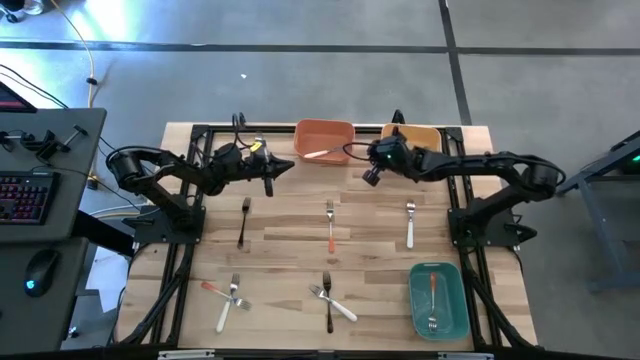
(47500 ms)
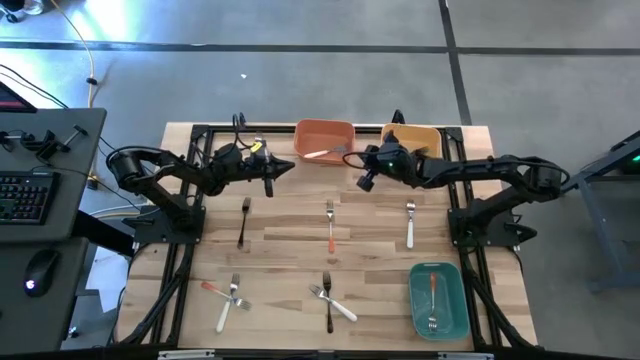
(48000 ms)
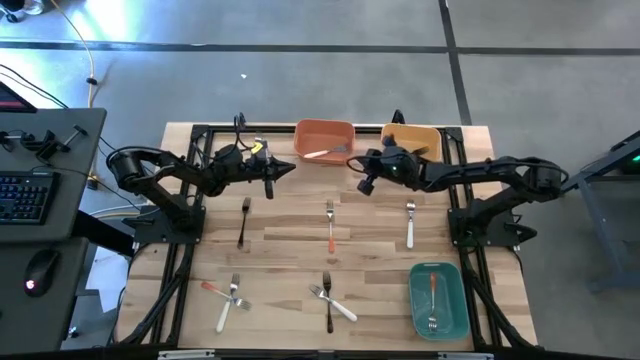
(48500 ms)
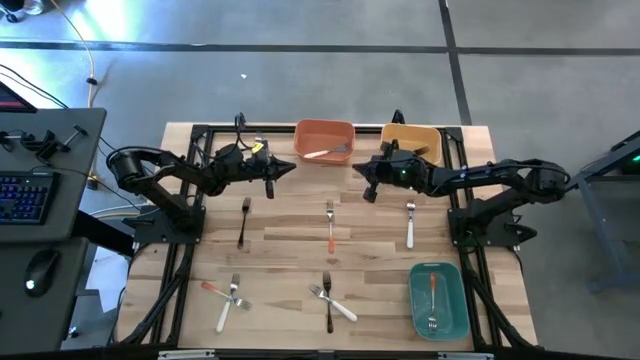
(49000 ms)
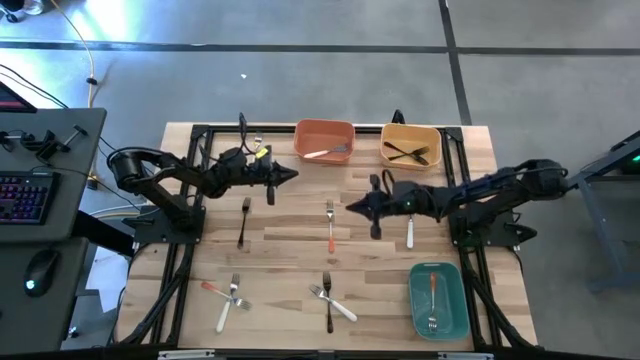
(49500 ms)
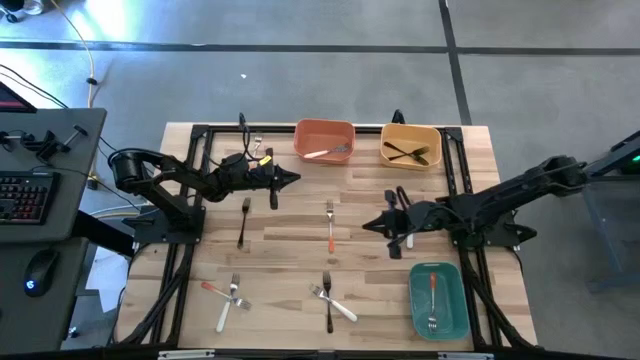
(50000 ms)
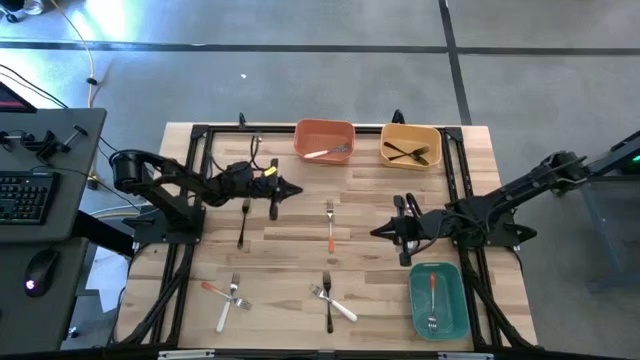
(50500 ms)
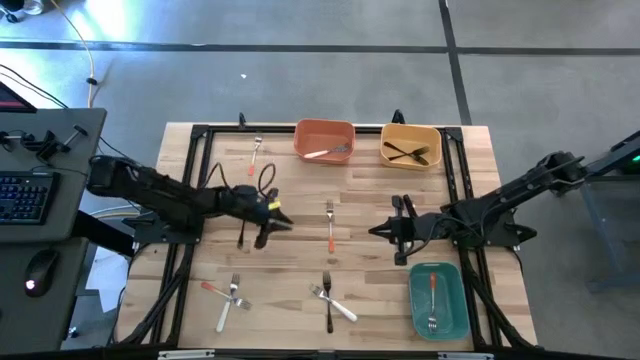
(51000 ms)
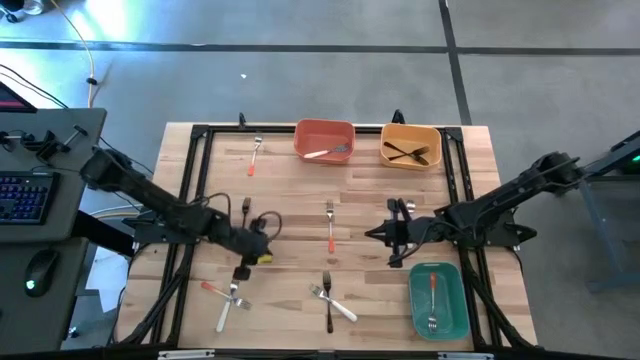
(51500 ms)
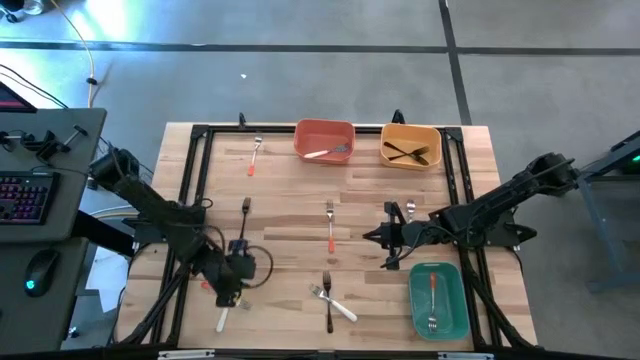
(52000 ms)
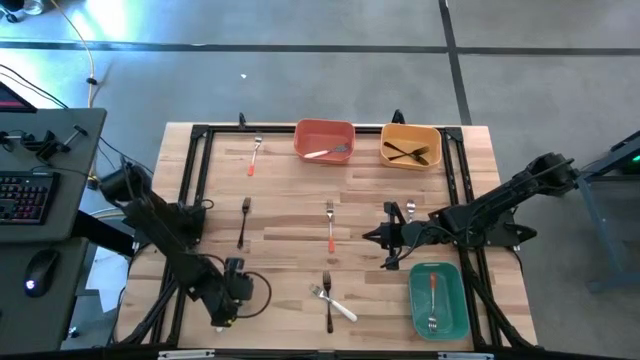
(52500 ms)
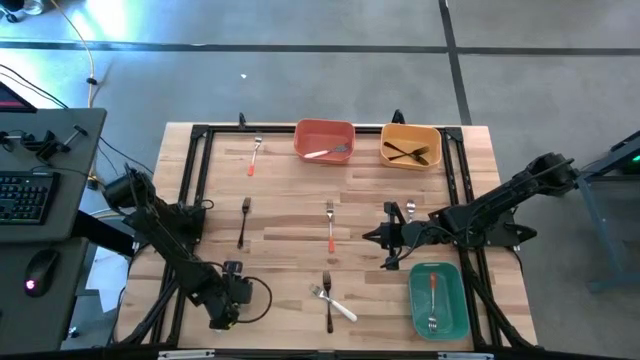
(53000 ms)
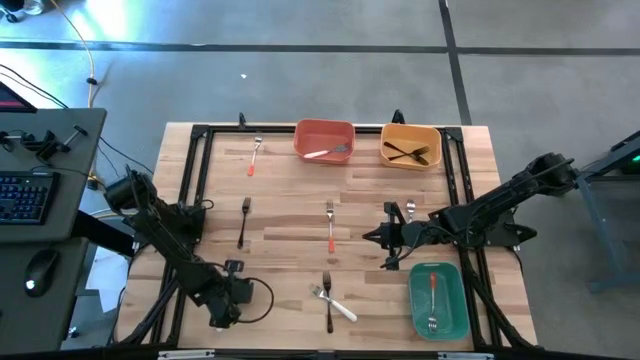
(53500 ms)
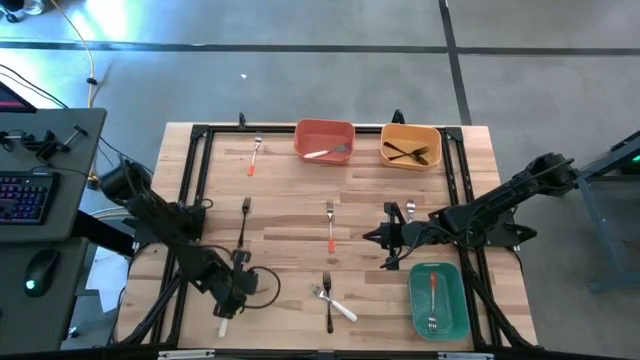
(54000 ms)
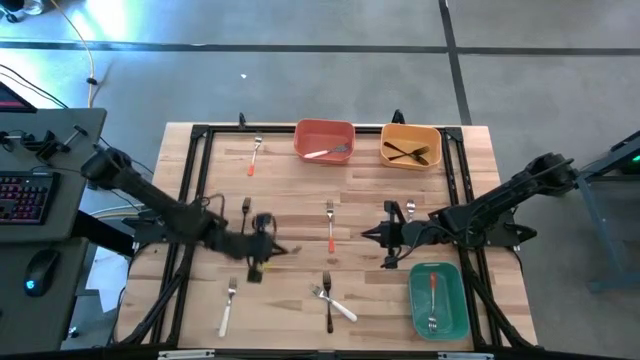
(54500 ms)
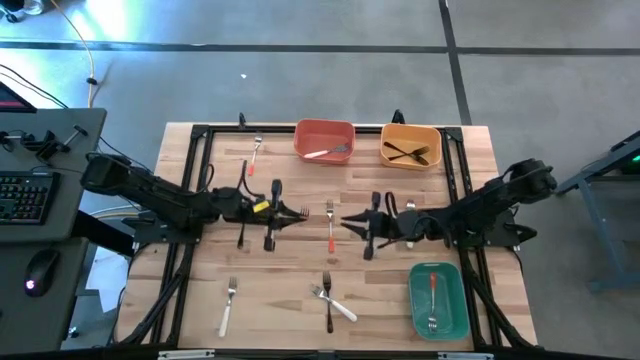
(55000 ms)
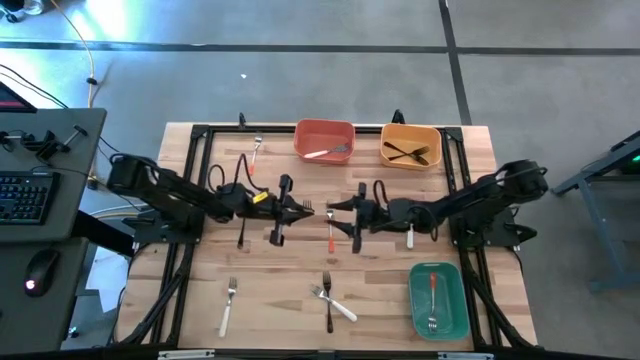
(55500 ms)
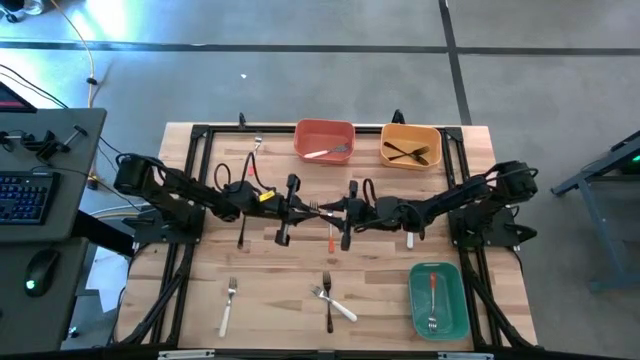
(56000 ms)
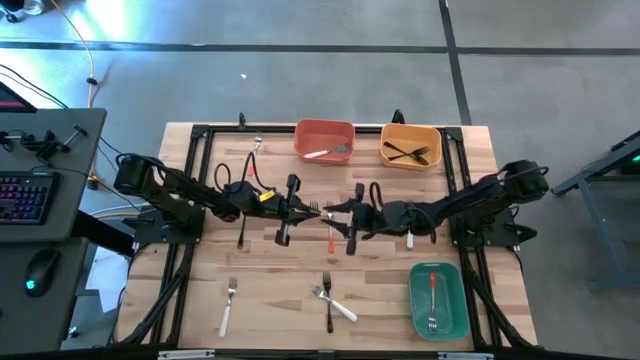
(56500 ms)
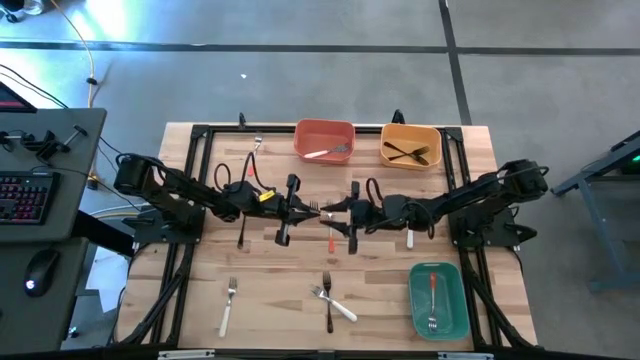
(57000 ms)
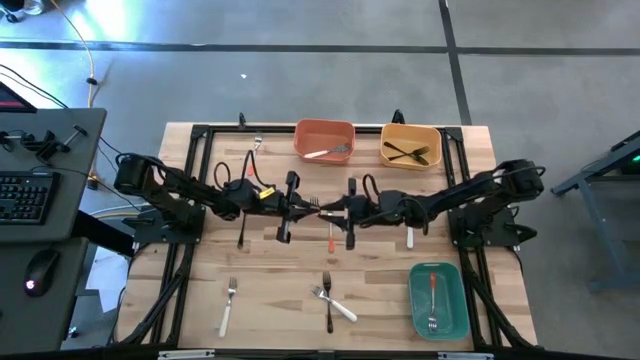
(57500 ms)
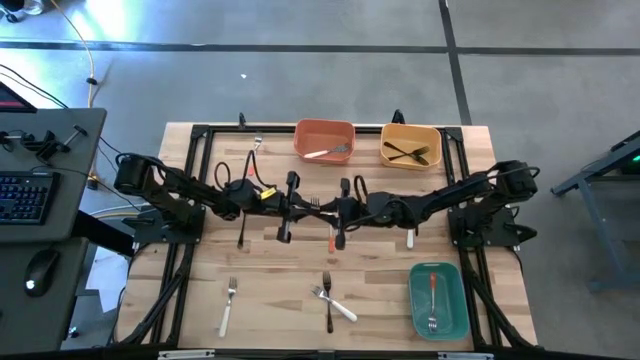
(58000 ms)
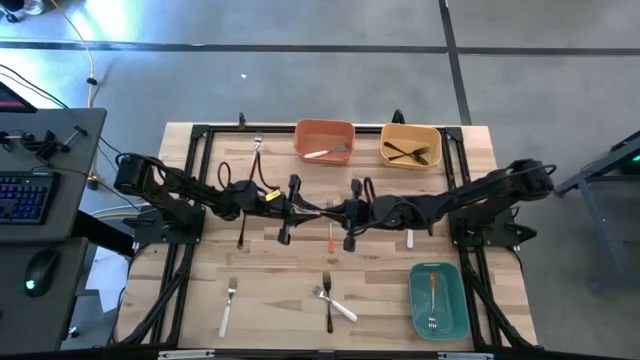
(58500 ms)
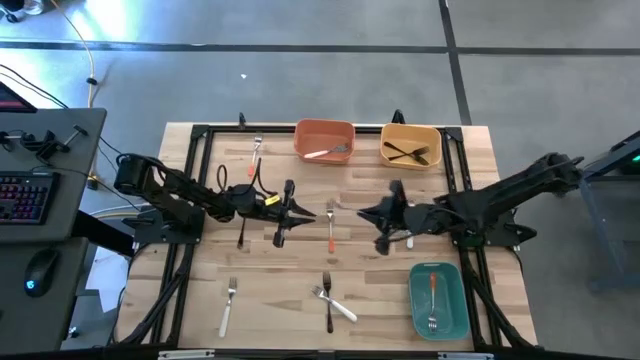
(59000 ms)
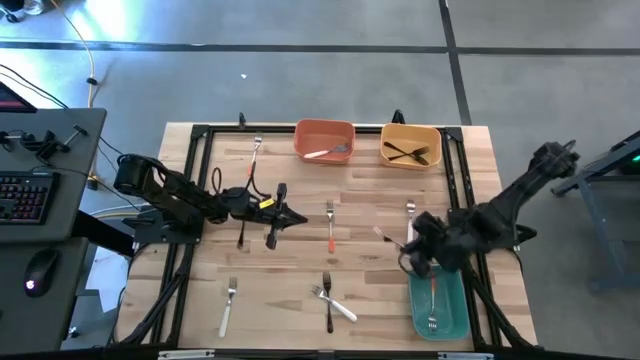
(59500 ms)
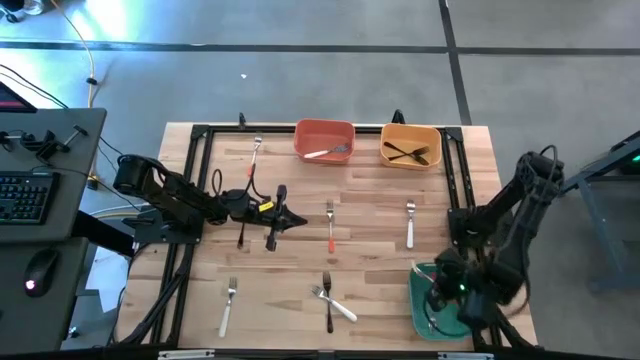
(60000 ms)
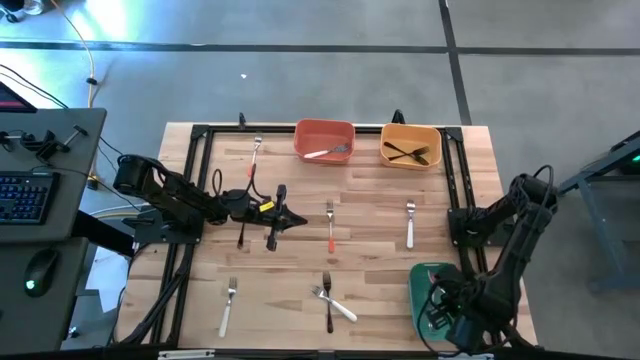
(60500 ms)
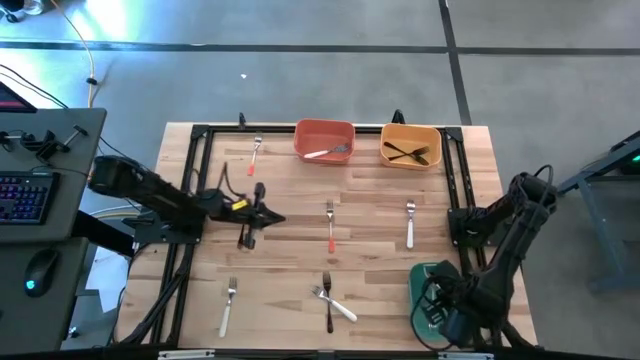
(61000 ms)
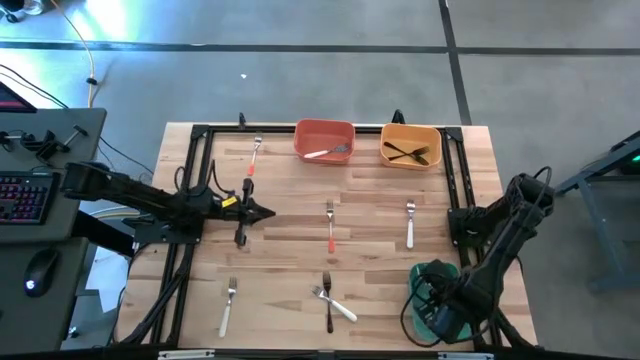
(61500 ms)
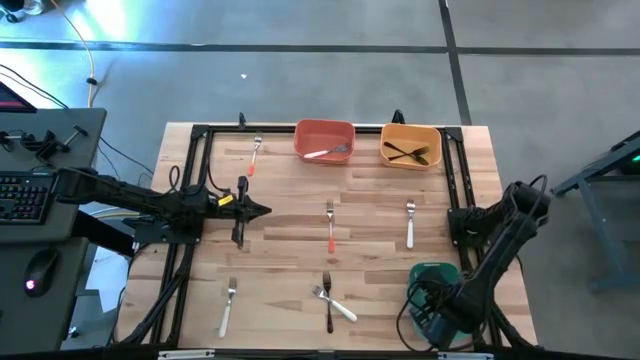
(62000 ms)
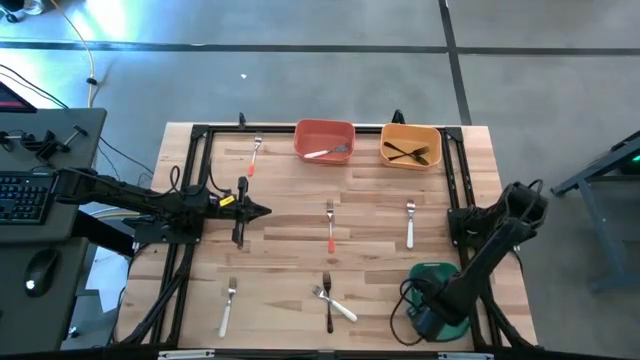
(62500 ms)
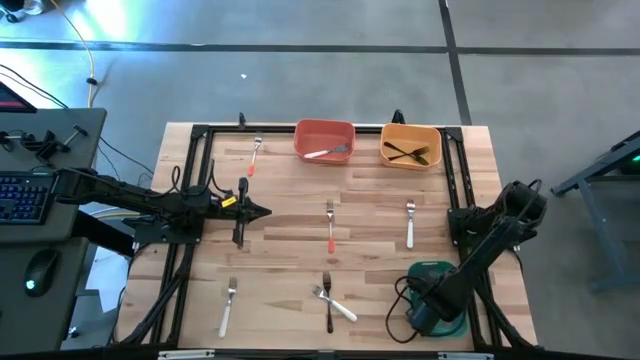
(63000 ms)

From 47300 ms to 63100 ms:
Task: Sort silverware by color (type)
Put the orange fork into the green bin

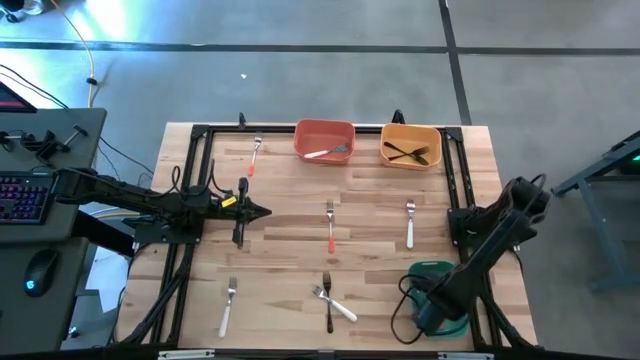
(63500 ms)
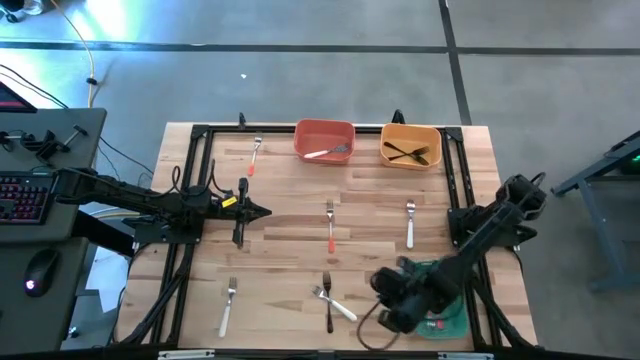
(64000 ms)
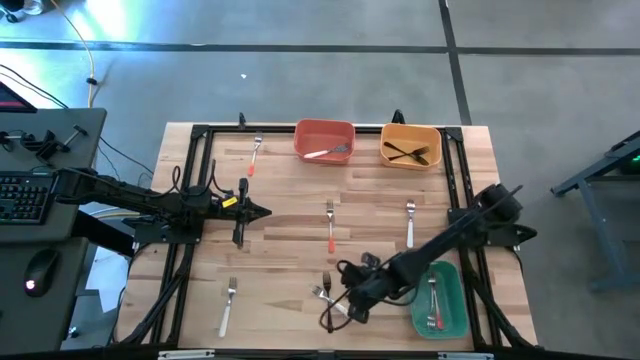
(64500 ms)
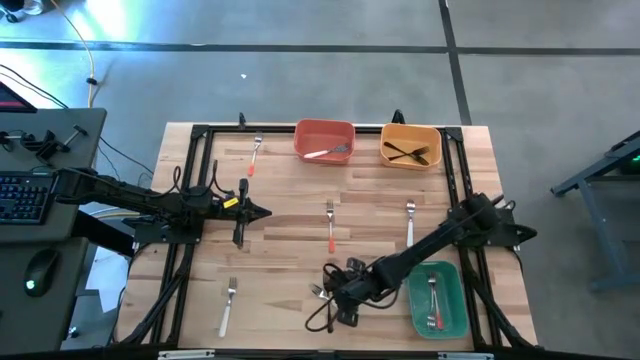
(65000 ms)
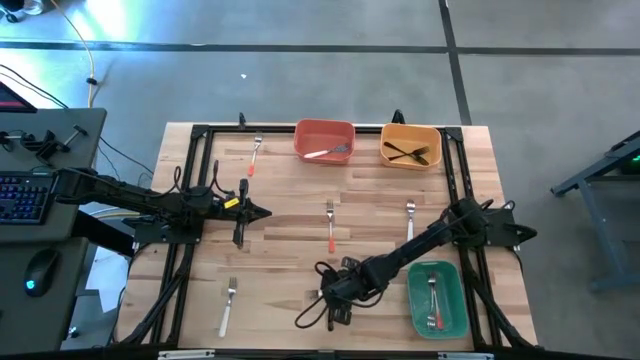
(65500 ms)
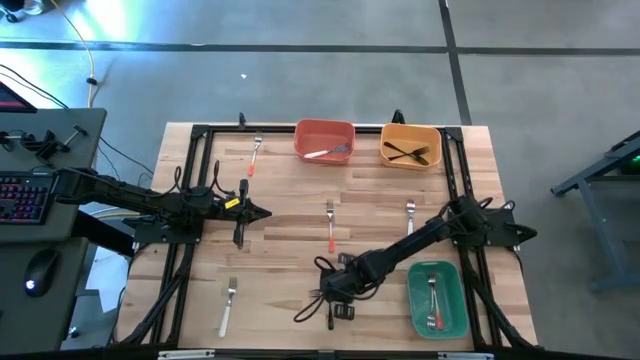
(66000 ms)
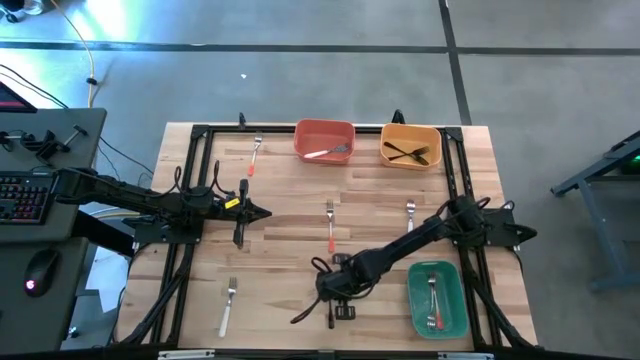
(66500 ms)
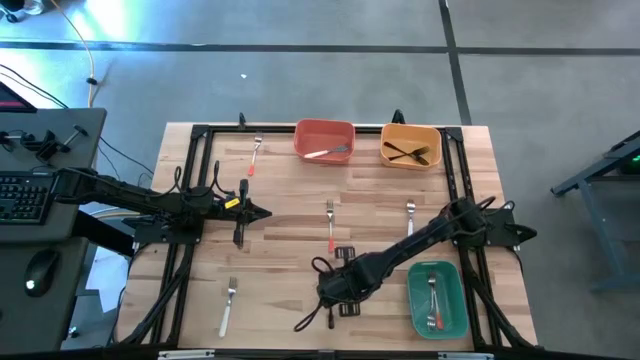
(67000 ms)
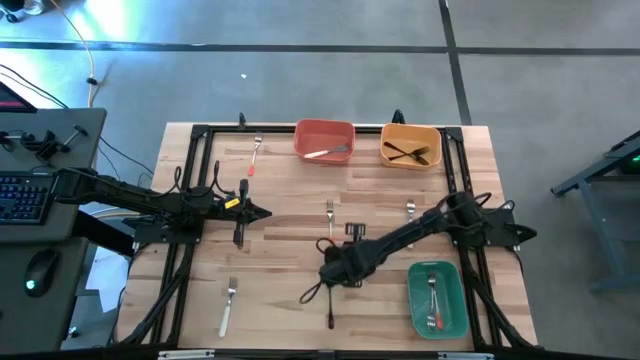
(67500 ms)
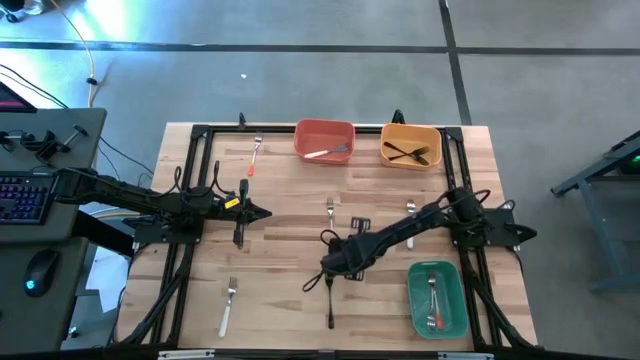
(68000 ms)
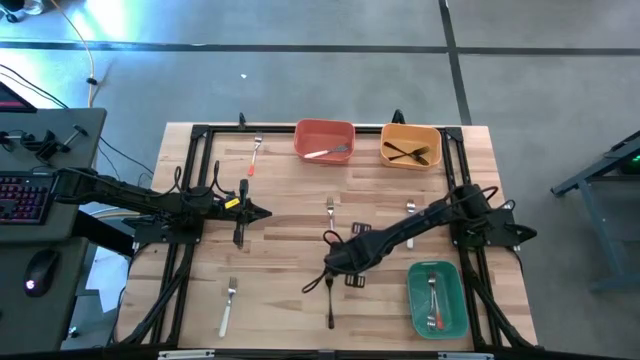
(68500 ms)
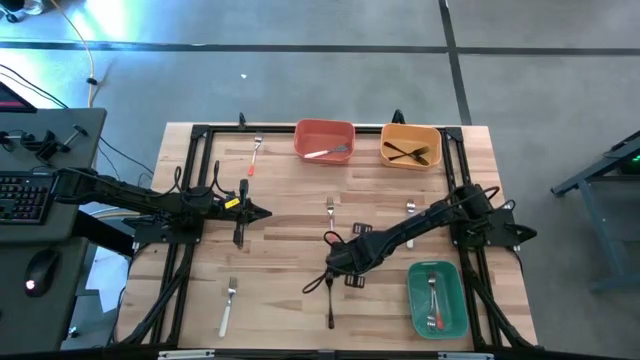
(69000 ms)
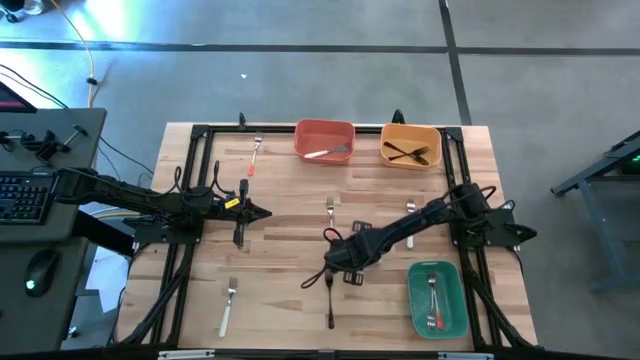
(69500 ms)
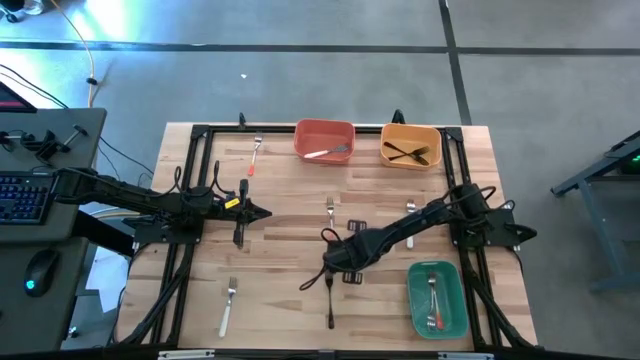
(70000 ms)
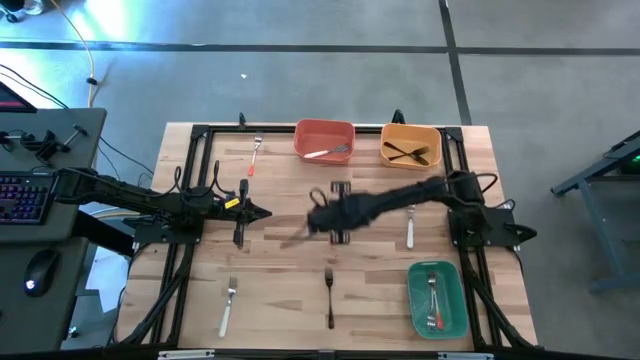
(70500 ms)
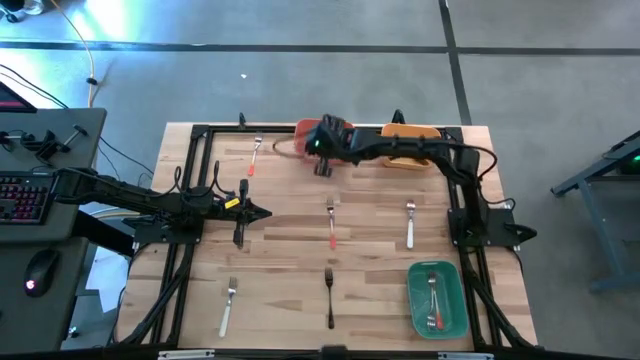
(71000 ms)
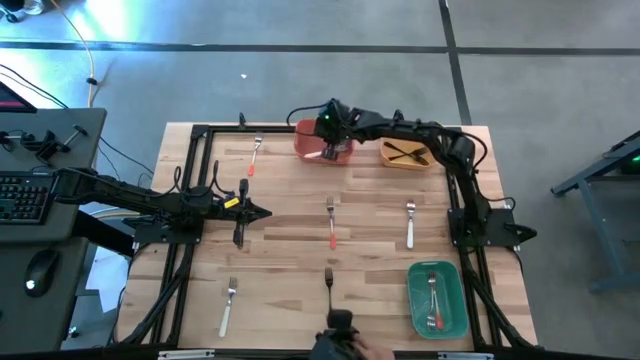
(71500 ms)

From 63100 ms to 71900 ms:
Put the white fork into the orange bin
